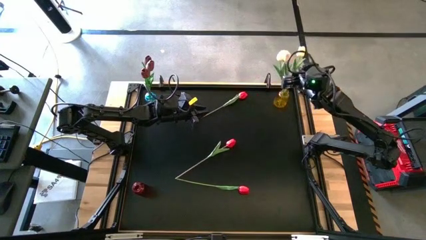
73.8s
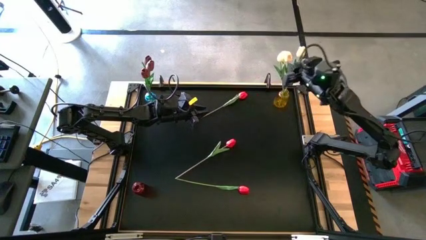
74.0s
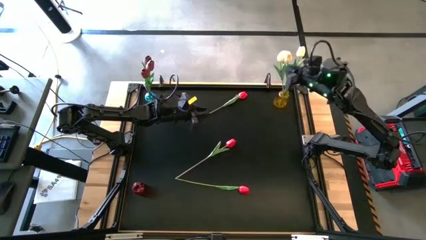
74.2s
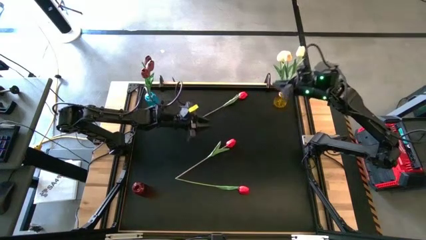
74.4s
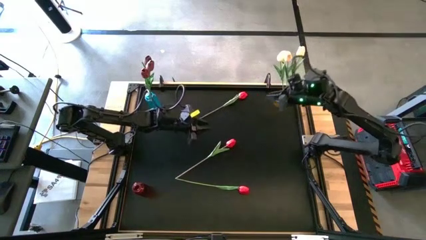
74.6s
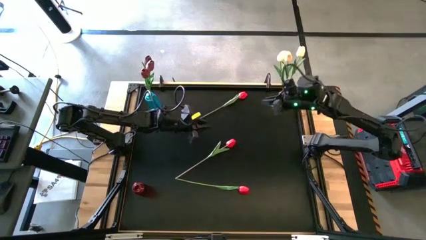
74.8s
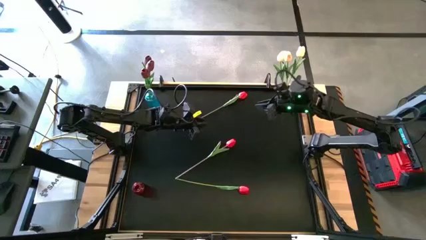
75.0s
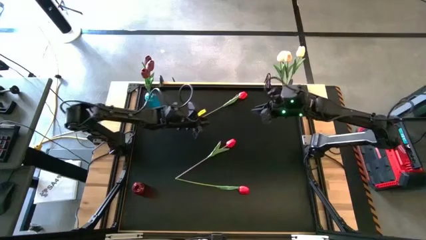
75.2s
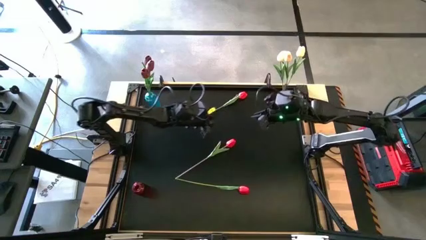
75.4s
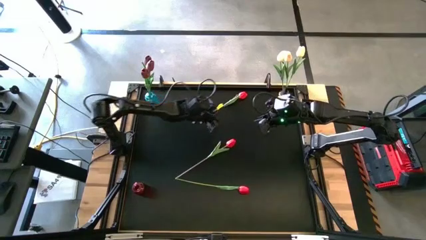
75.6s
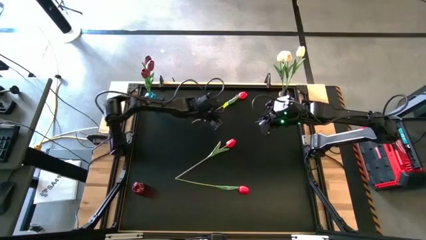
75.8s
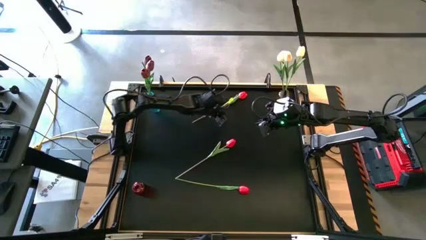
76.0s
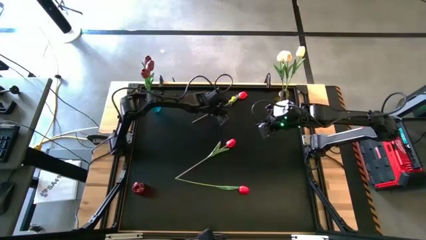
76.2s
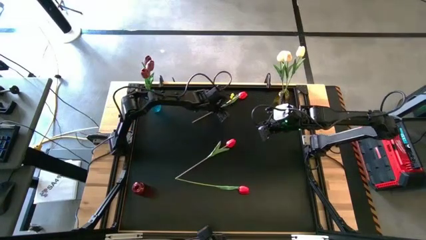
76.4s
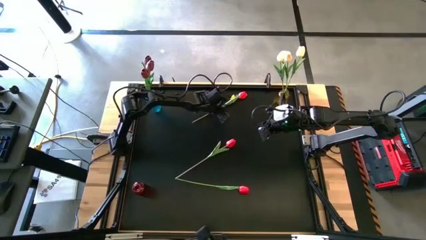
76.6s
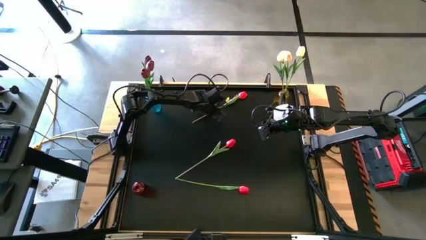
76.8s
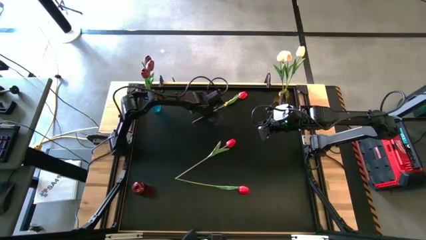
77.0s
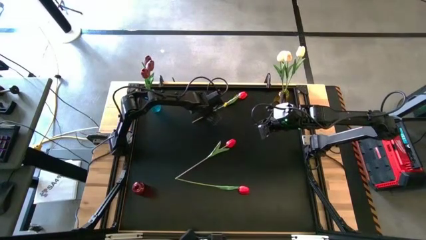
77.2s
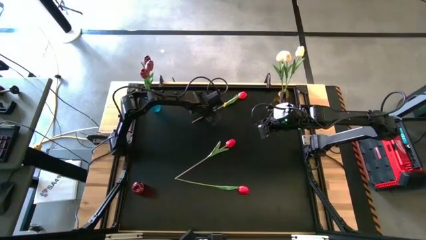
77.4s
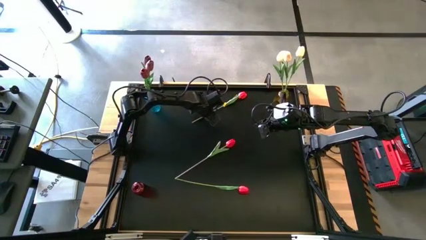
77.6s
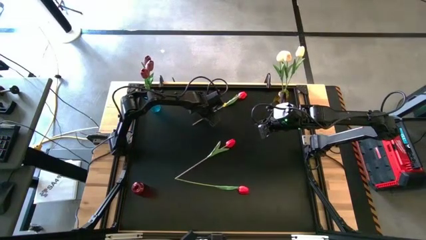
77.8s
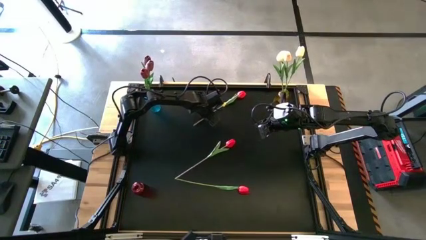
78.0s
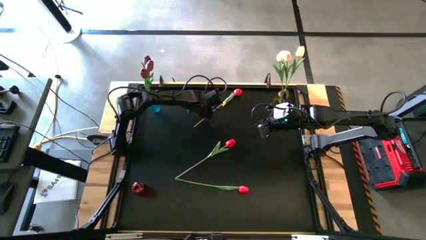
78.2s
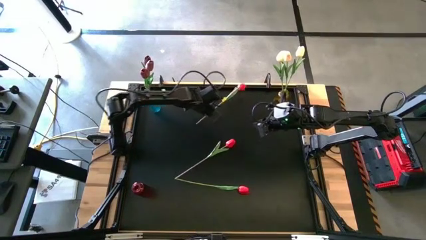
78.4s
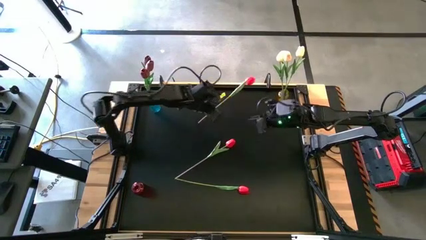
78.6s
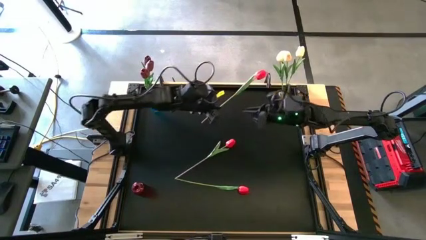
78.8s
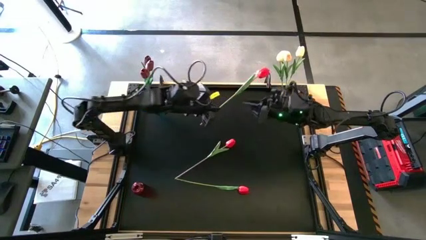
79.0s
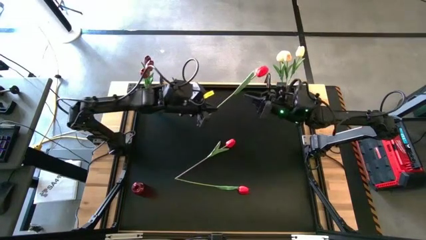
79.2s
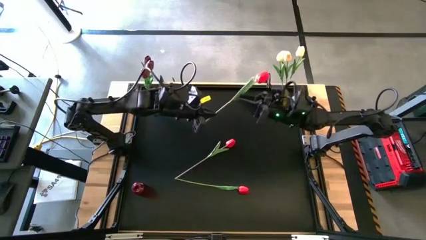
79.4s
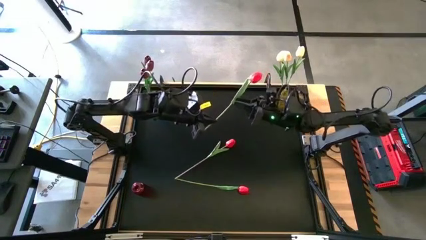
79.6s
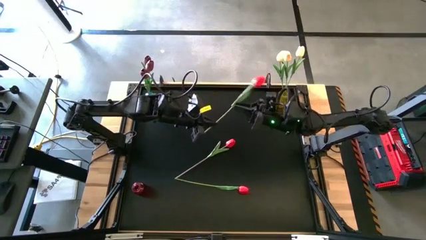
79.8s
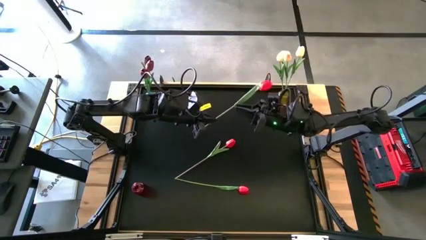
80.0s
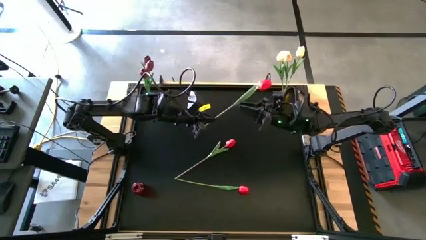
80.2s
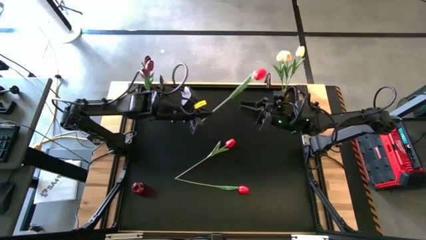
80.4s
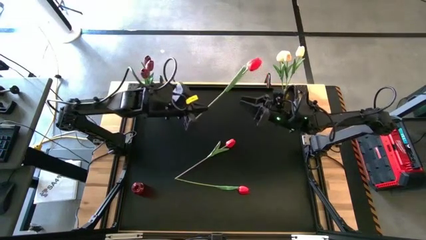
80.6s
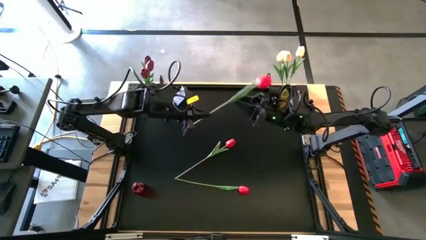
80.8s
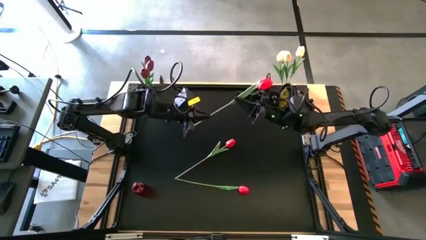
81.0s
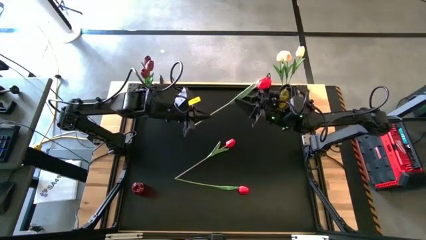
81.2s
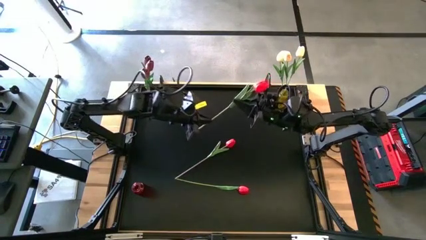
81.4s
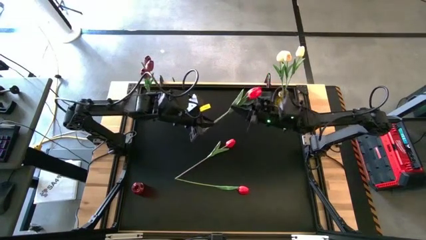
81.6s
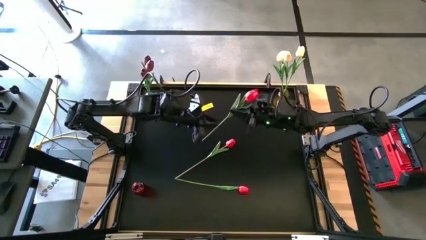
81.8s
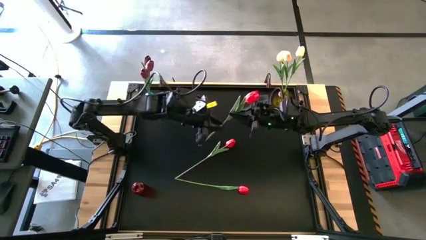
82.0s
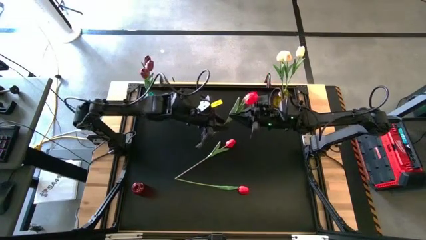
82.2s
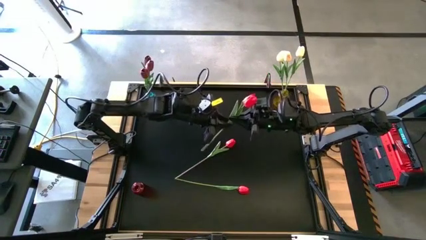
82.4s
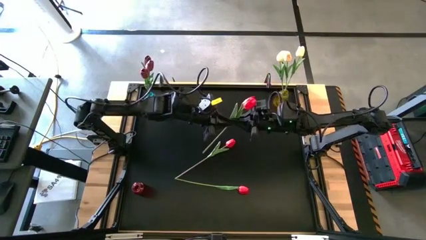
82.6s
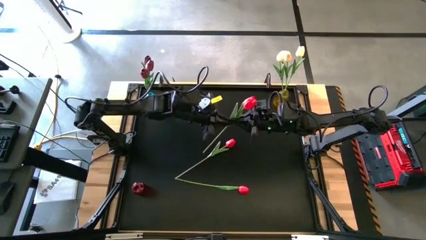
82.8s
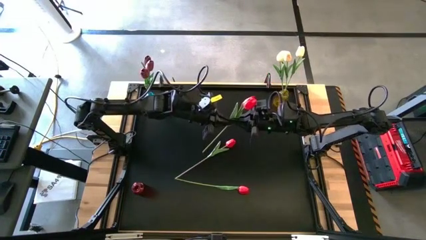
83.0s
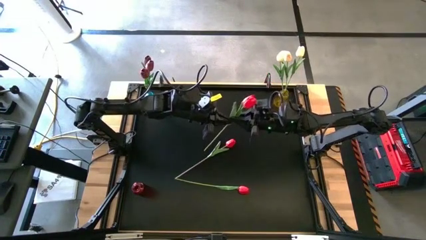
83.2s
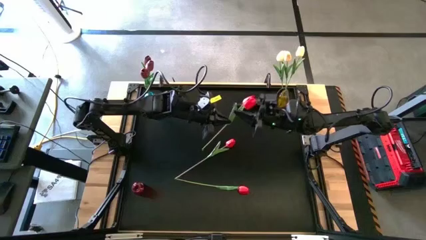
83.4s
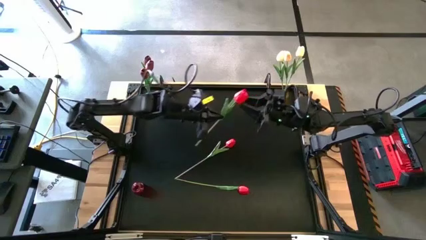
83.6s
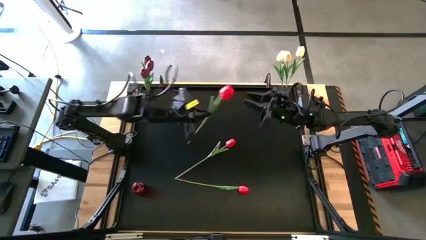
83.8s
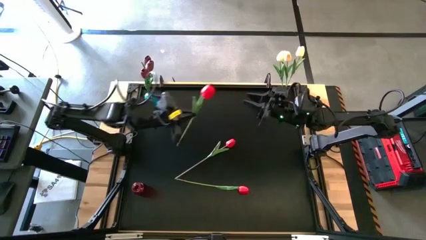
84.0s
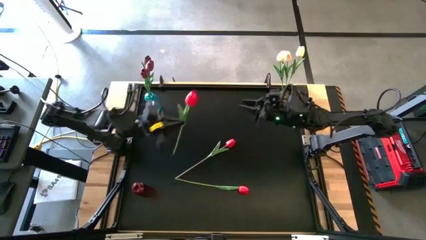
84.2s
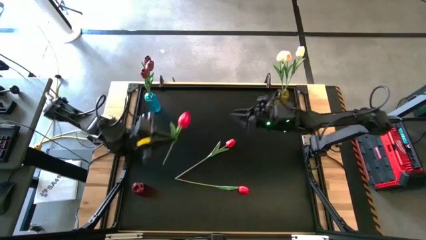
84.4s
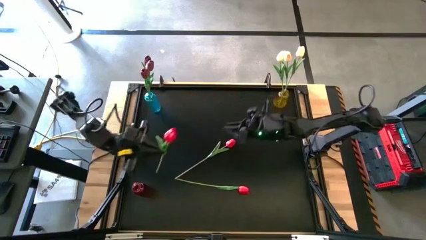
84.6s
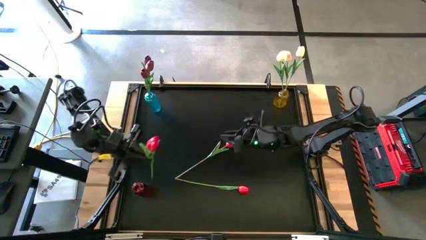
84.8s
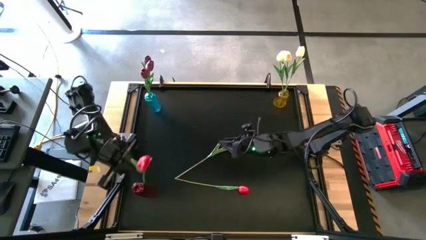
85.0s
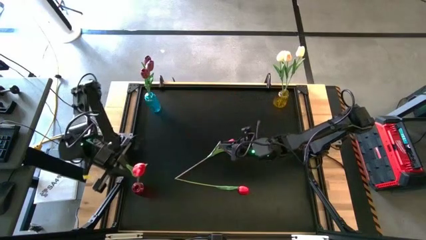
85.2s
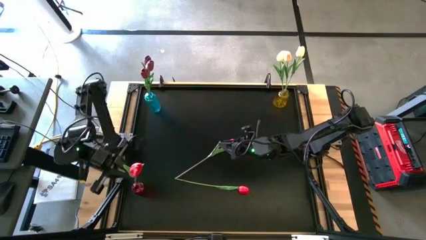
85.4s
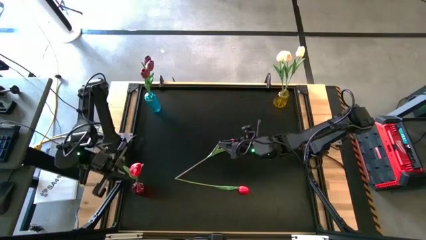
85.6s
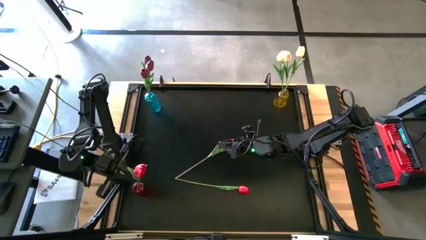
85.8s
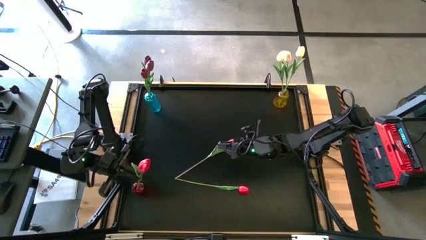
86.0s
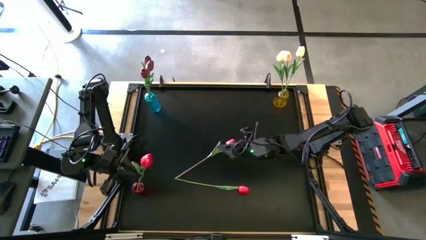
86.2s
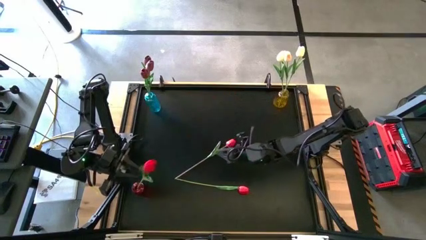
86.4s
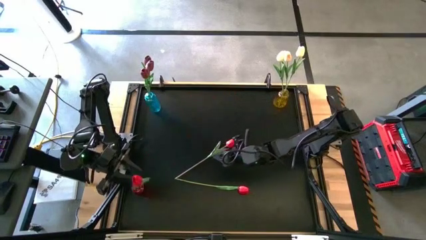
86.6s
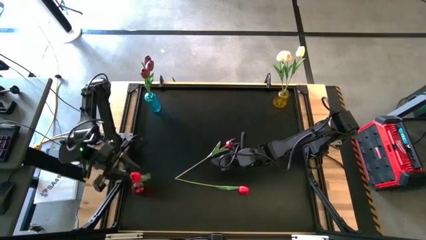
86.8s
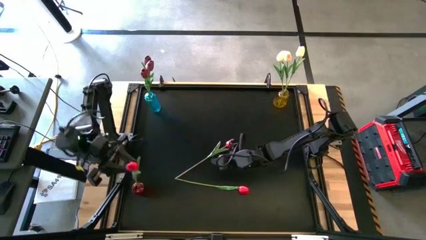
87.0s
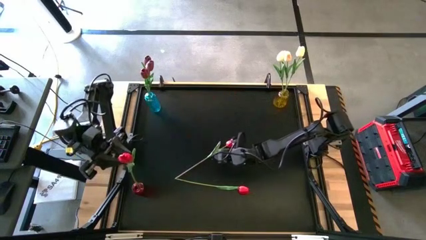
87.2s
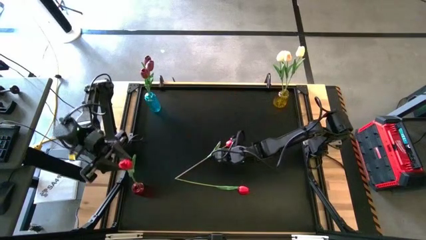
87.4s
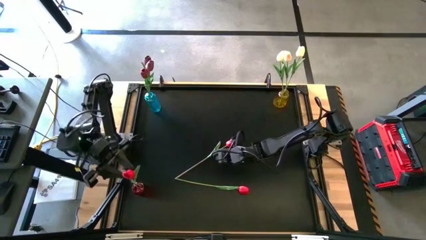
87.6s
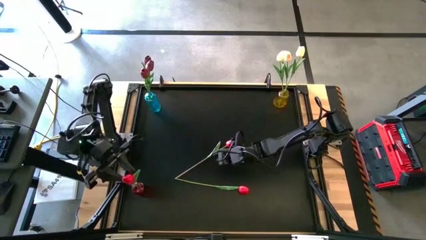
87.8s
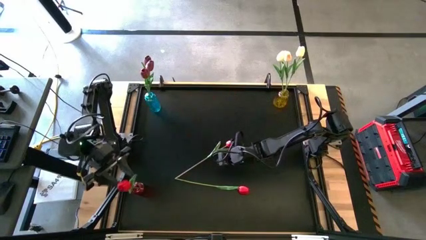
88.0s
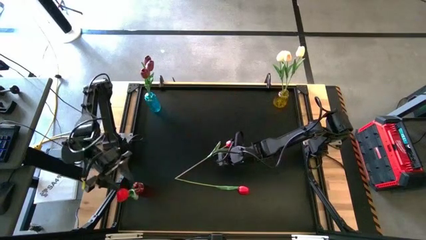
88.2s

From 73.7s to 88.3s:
Task: Sort flowers into vase by color
Put the top center red flower into the red vase

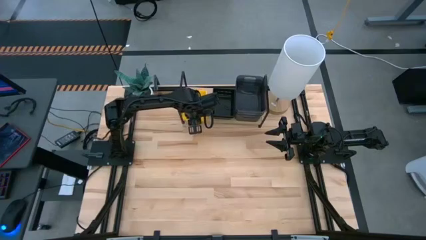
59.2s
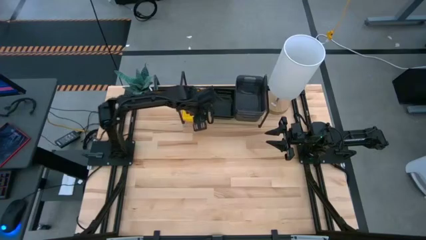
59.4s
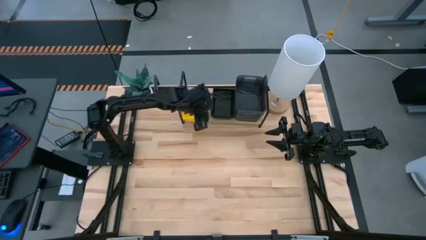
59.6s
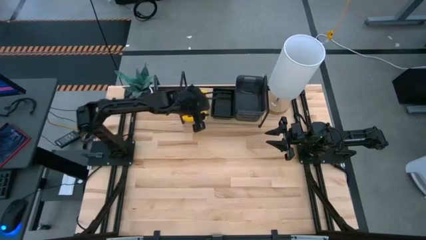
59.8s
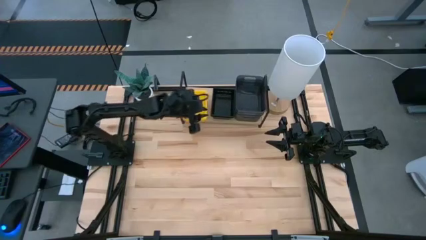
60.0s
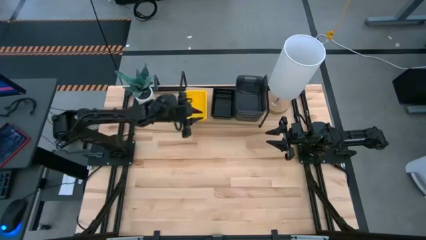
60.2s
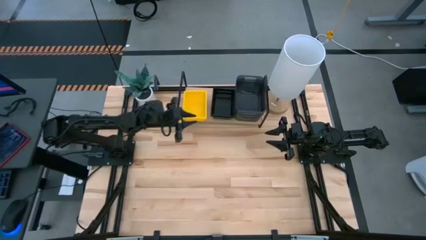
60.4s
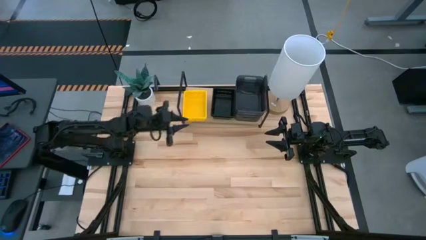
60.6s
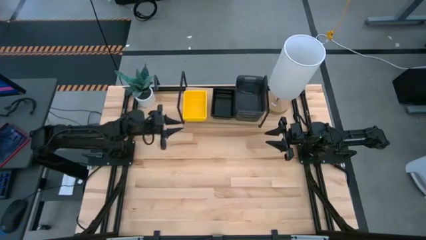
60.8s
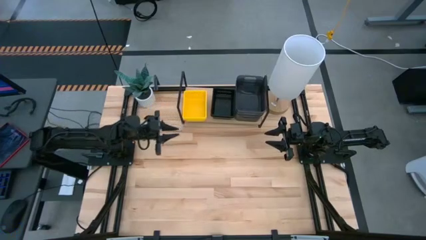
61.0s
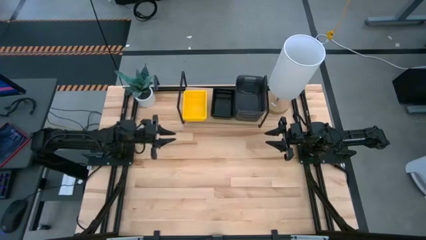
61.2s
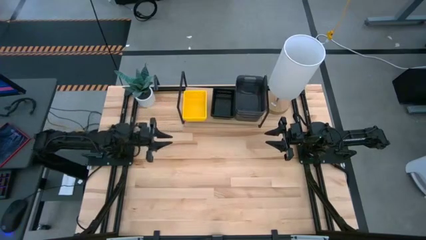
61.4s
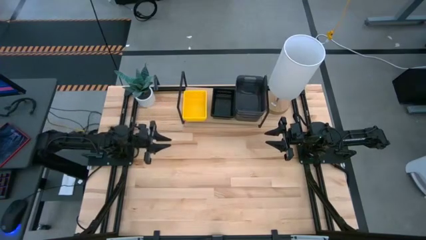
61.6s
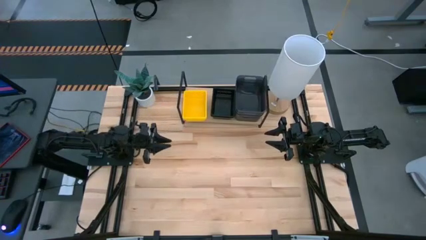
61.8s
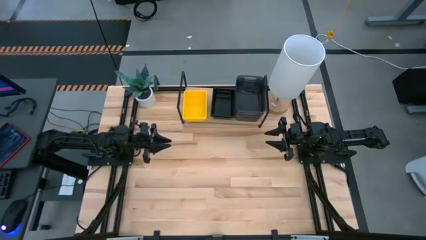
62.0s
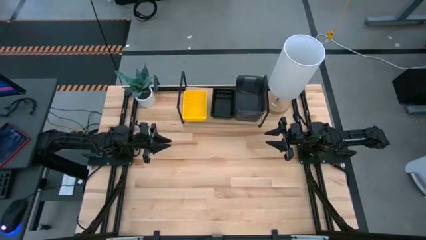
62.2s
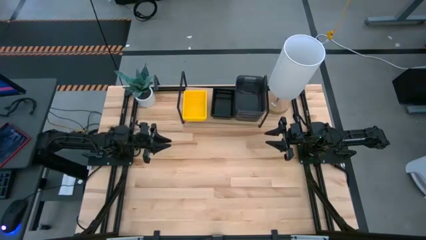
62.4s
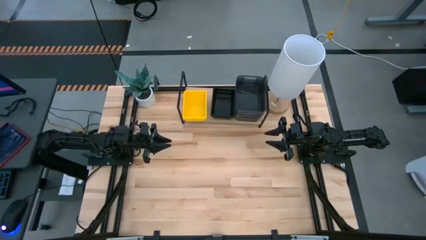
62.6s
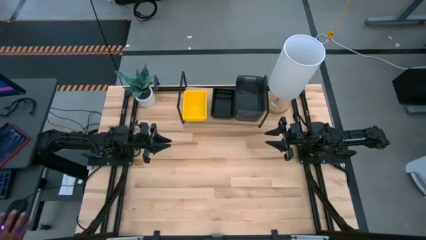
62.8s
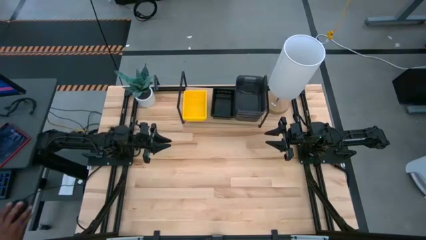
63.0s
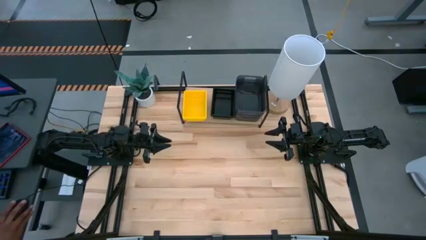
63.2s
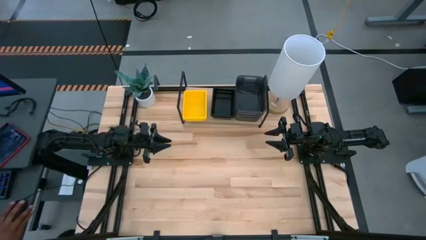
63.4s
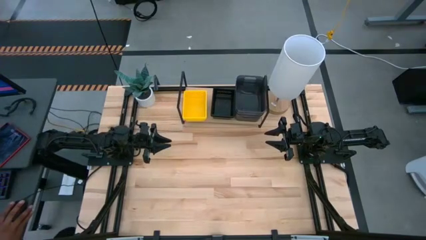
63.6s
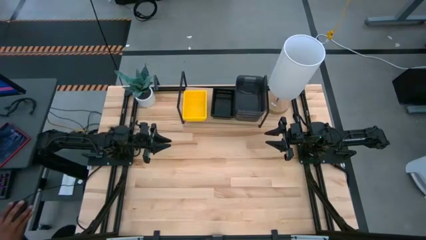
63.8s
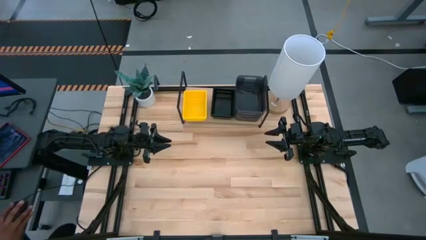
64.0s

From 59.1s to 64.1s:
Task: Stack baskets on shelf by color
Return to Home Position
